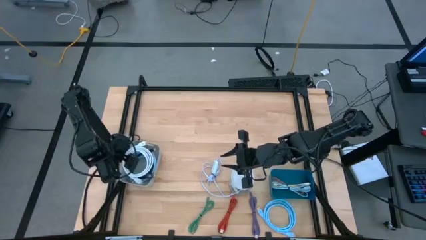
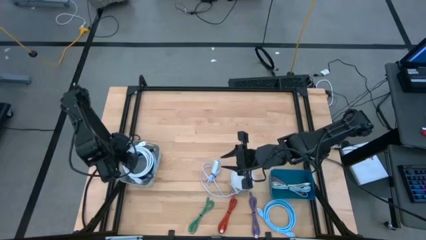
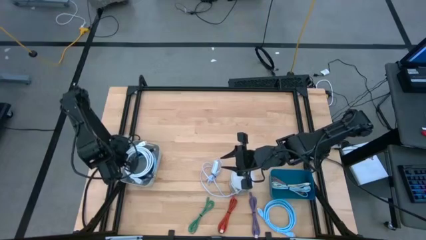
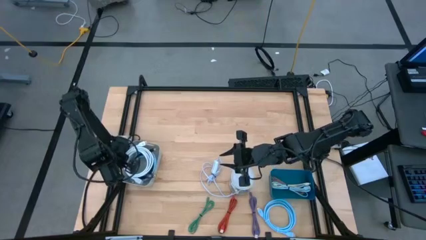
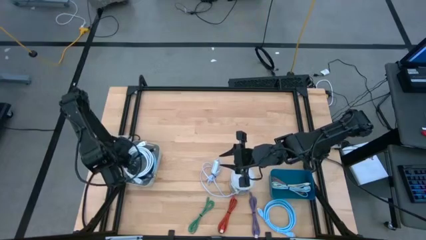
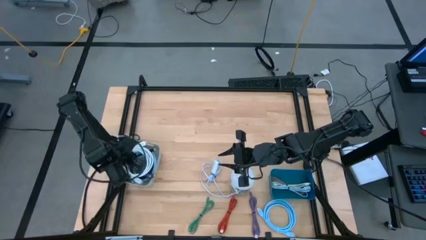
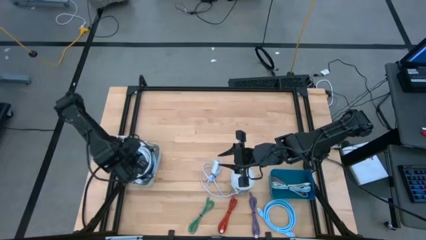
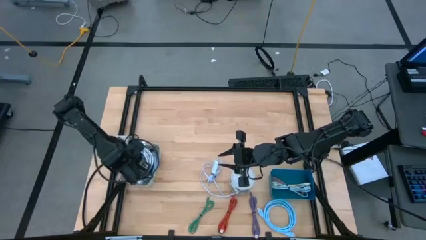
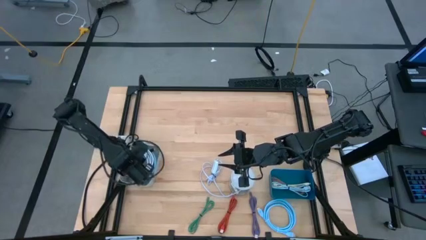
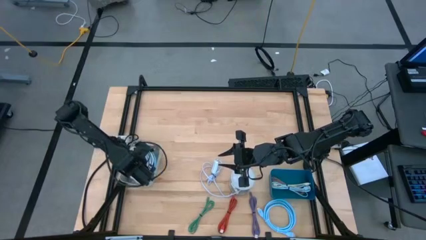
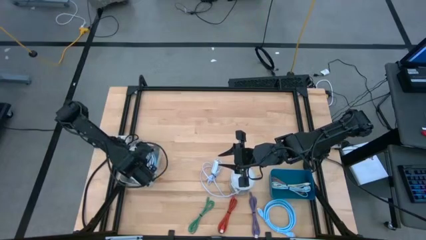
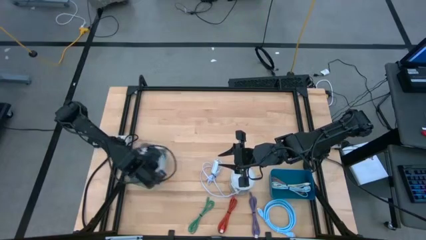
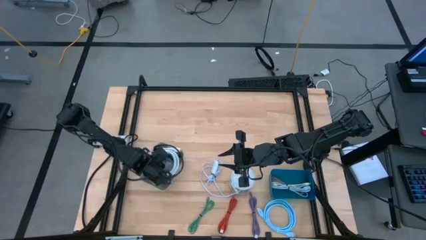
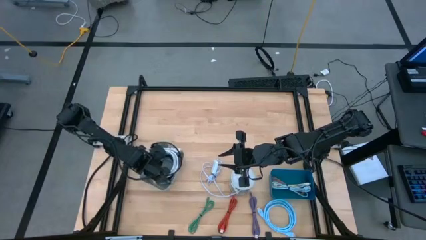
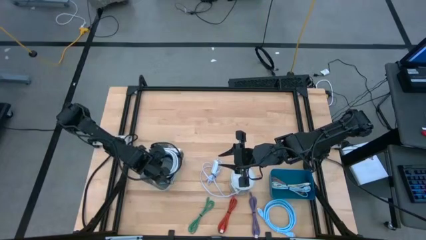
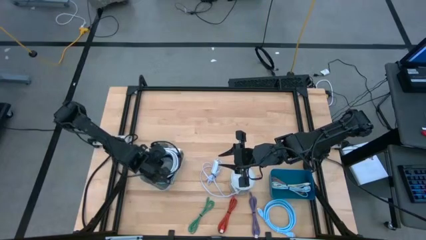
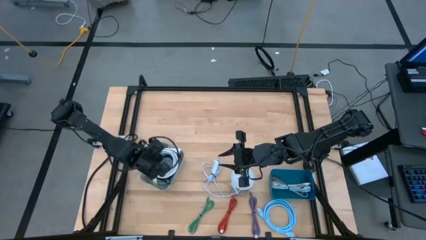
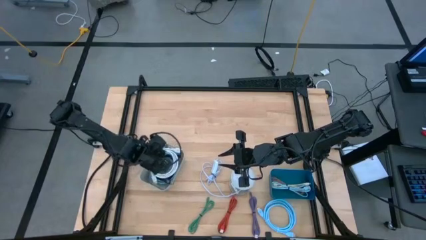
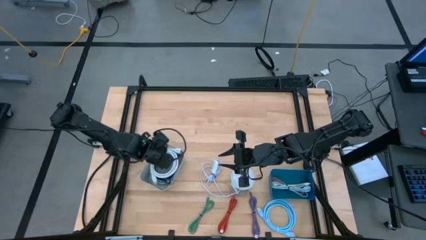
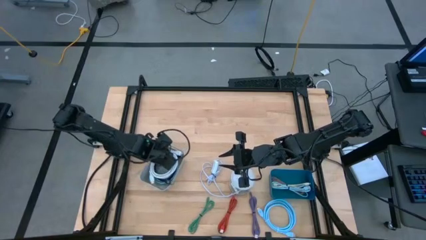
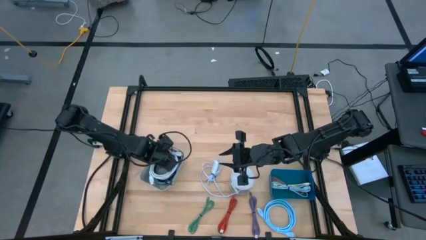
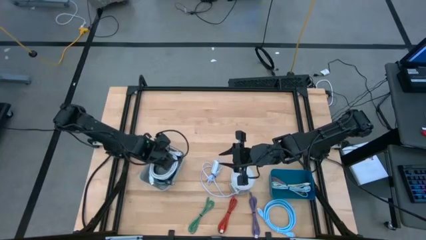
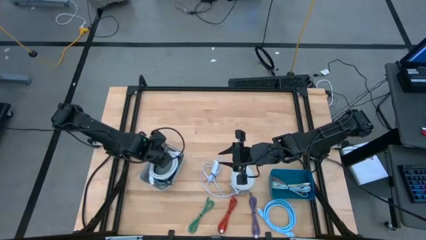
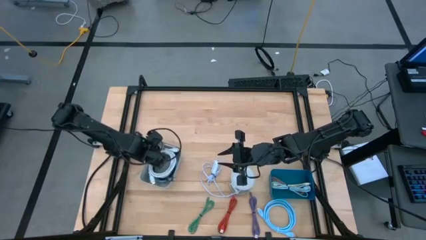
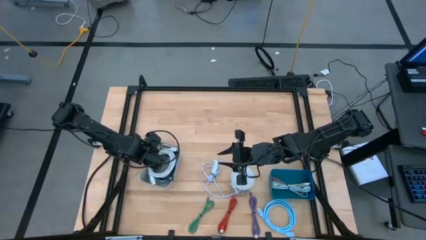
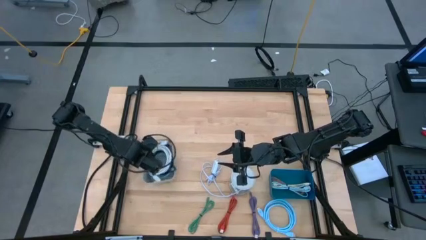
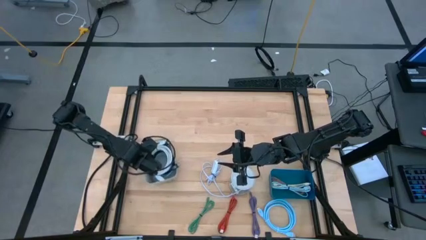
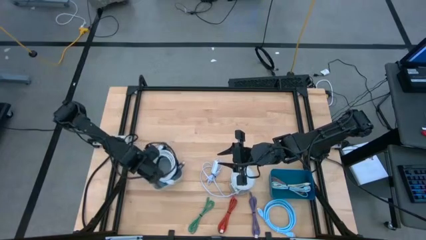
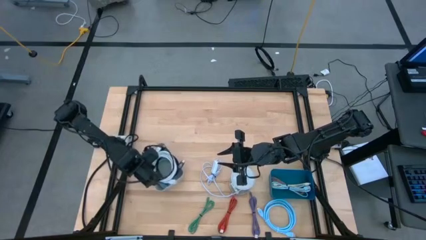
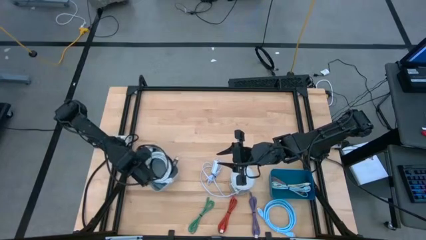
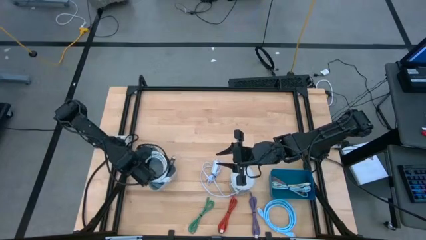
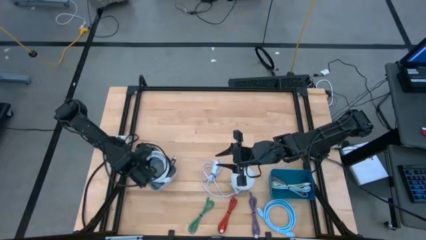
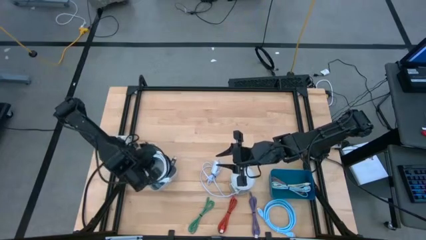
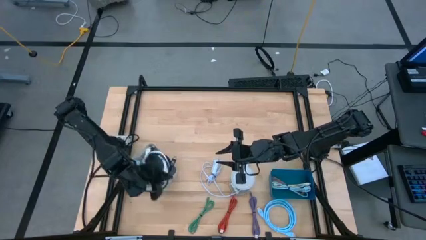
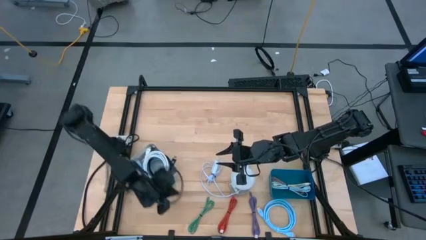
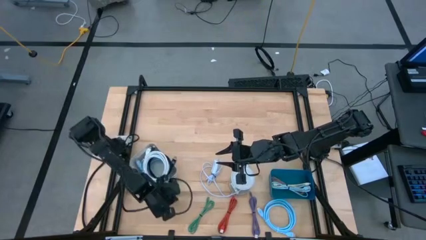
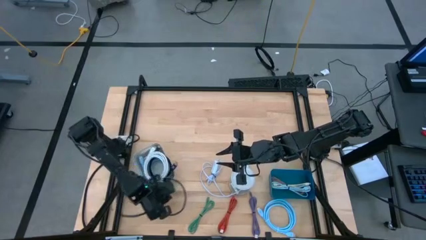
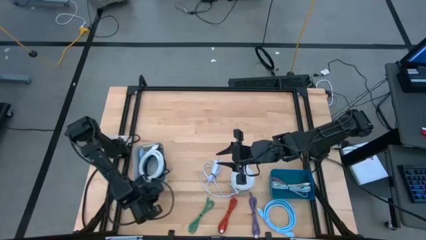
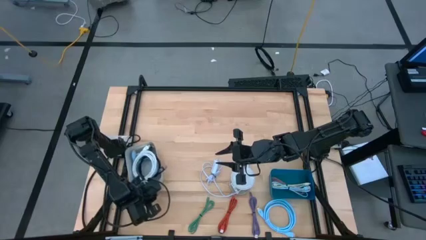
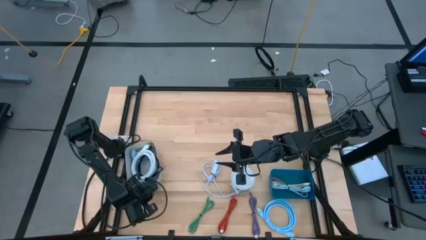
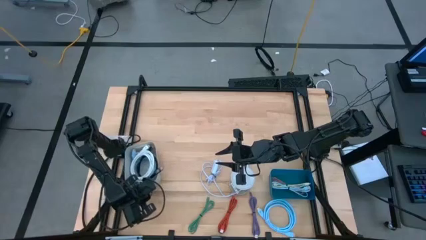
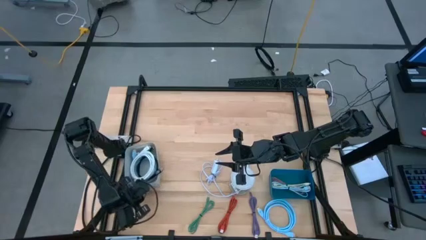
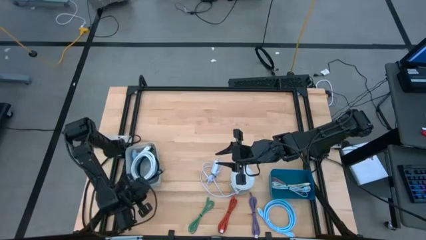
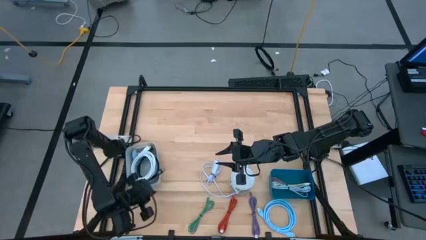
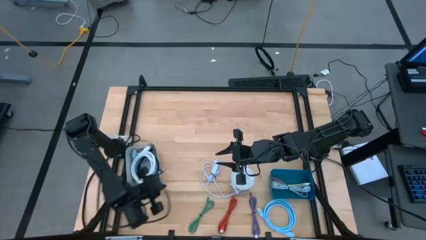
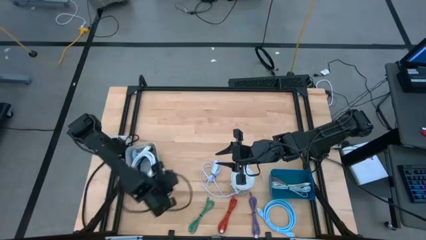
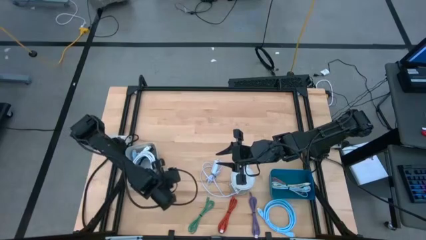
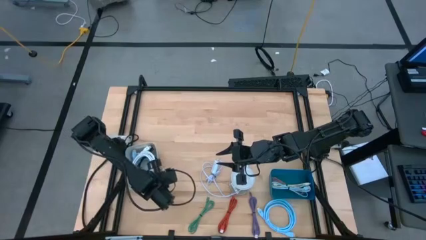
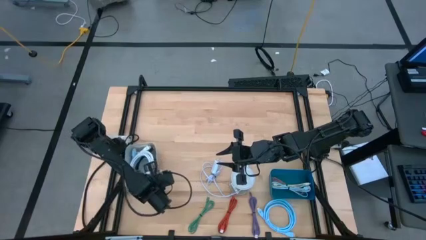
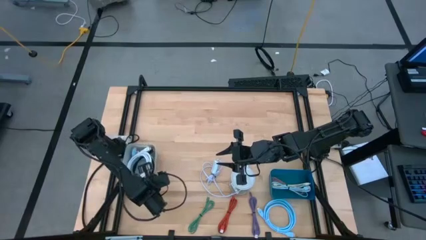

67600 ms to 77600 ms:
Task: Pick & Place USB Port
Adjust the left gray bin from the table

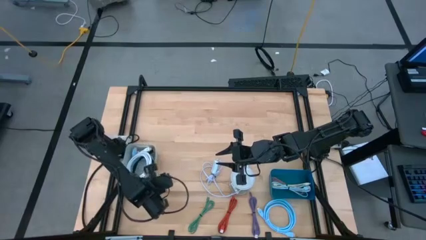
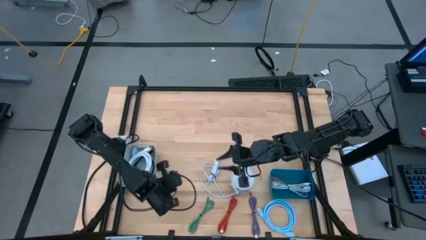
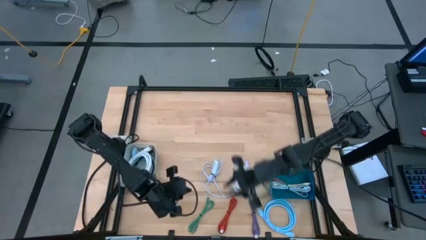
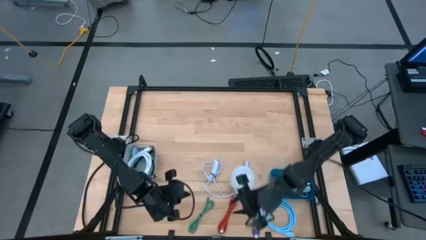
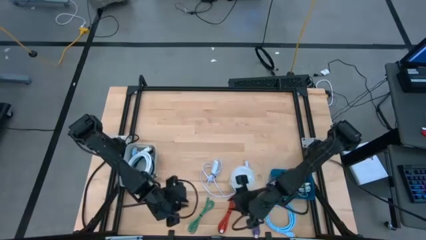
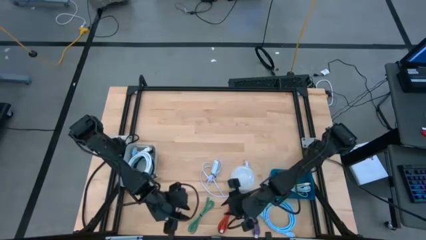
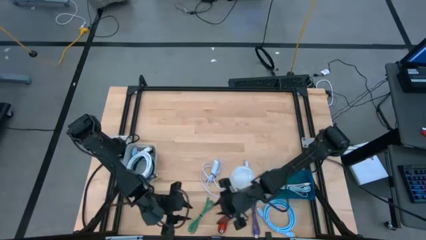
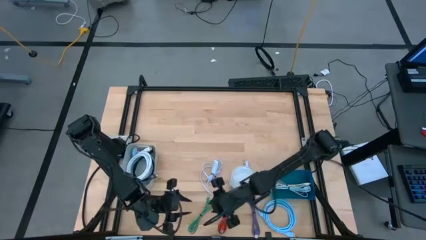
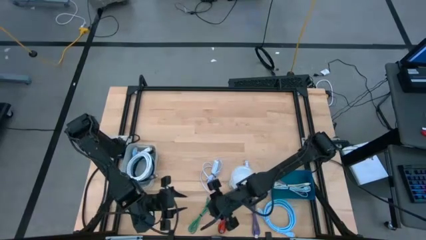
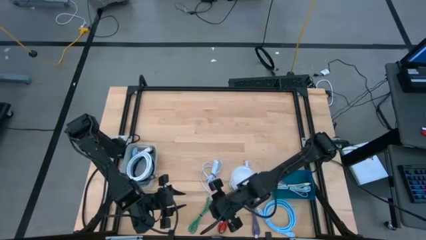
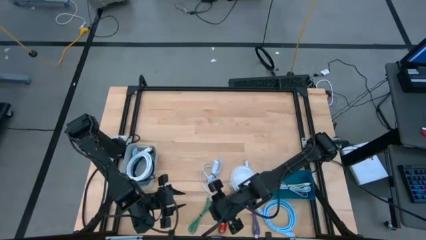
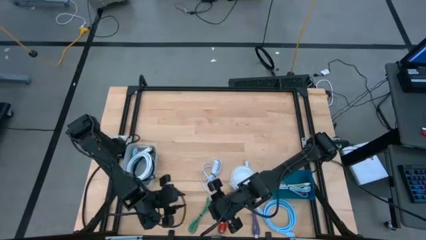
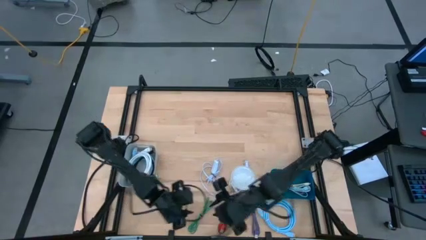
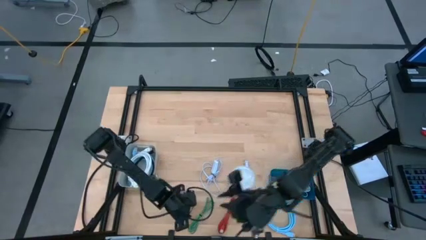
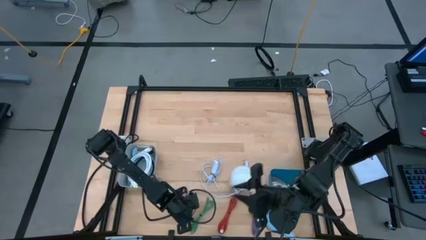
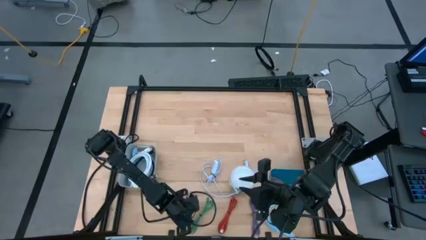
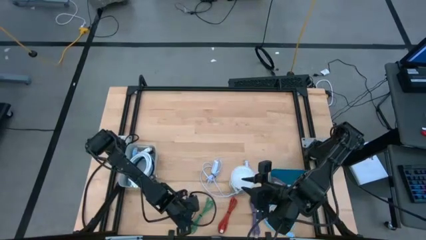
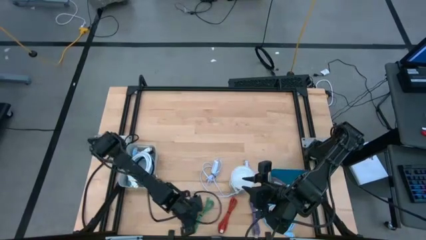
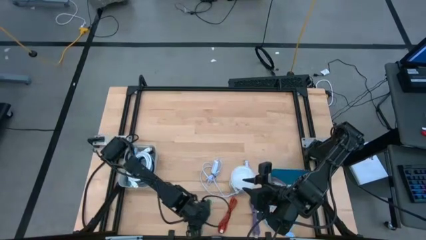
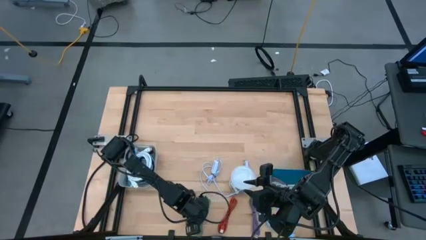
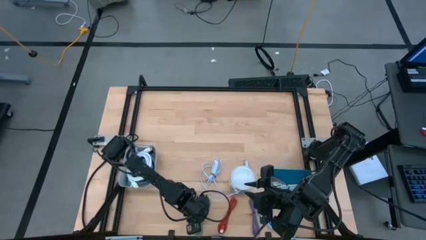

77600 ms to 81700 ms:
Put the green USB cable into the blue bin

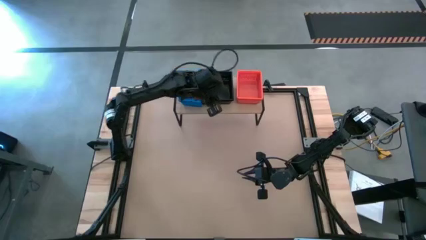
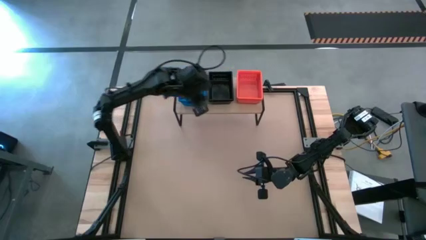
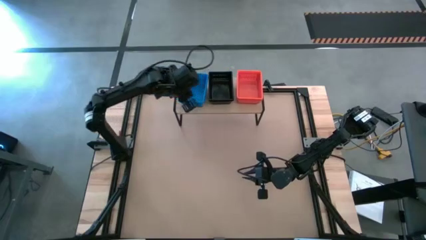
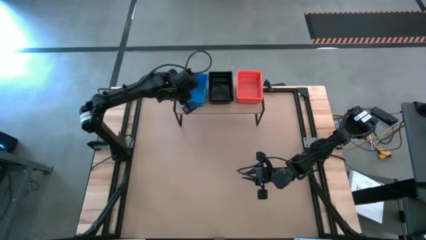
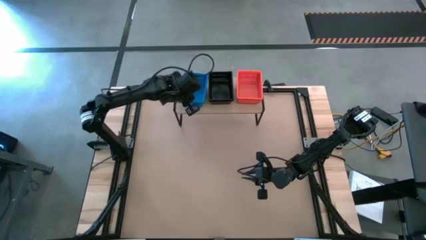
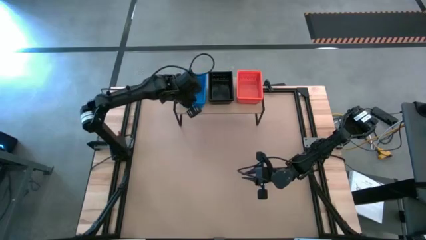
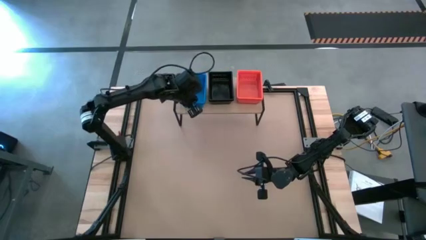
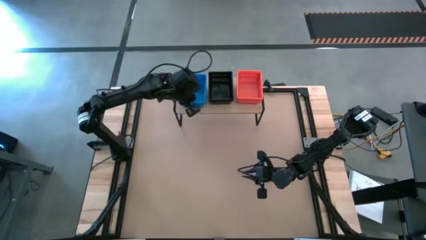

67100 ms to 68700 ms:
Task: Stack baskets on shelf by color
Adjust the stacked blue bins
